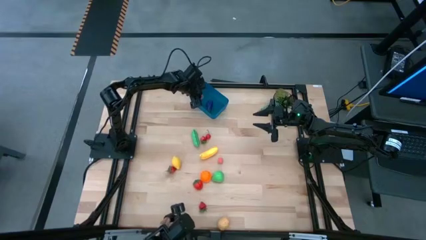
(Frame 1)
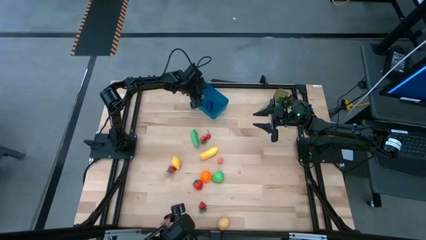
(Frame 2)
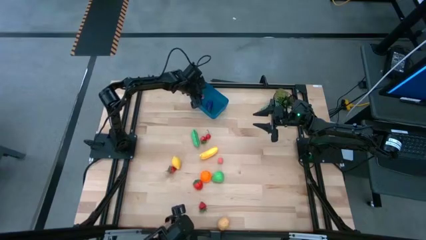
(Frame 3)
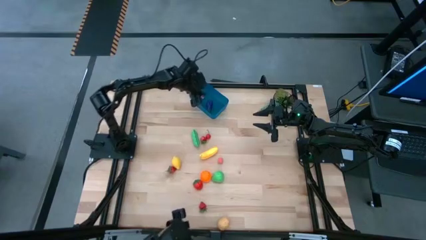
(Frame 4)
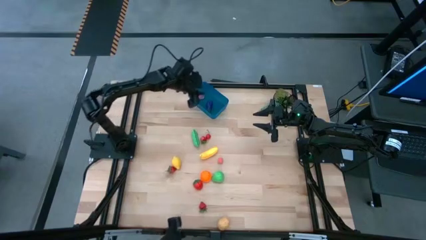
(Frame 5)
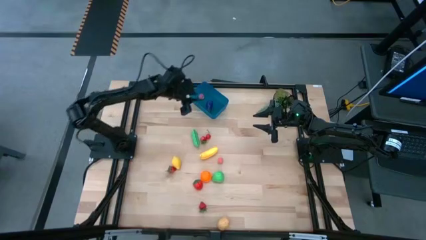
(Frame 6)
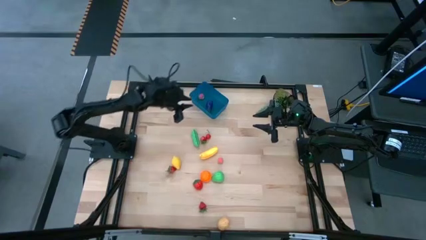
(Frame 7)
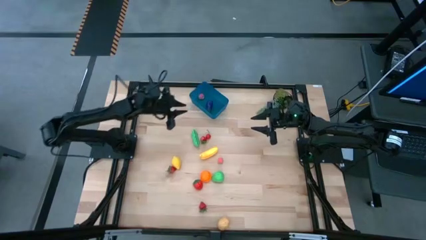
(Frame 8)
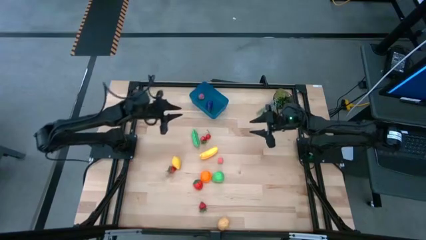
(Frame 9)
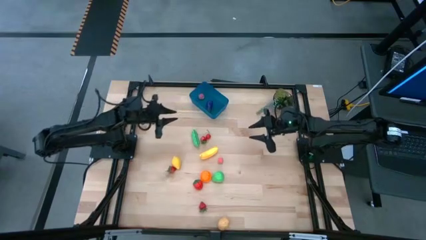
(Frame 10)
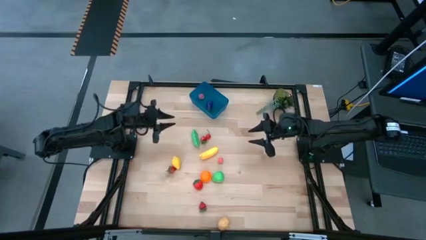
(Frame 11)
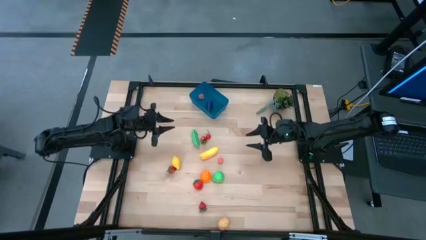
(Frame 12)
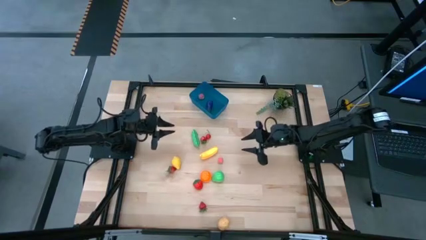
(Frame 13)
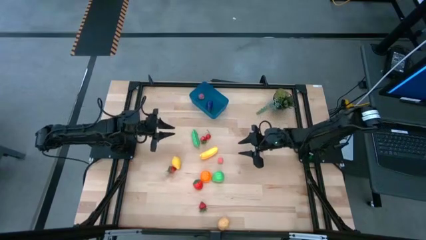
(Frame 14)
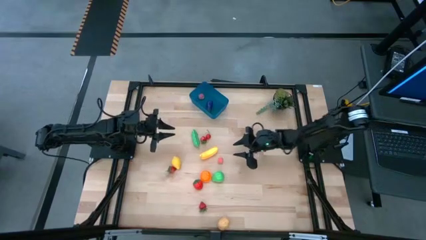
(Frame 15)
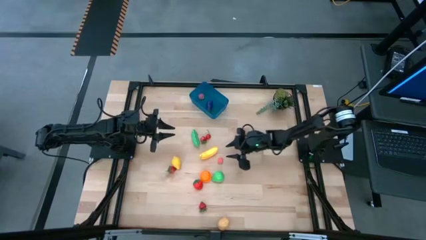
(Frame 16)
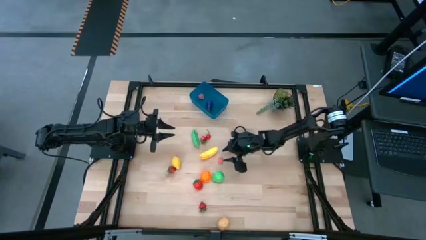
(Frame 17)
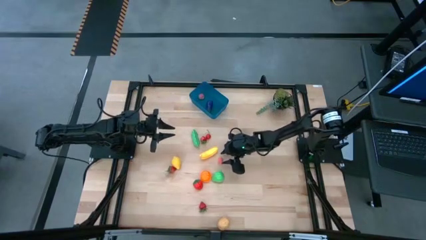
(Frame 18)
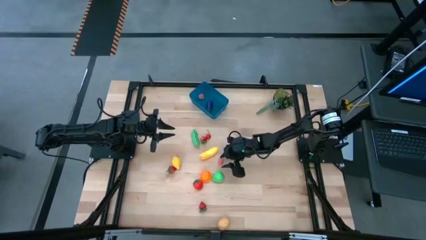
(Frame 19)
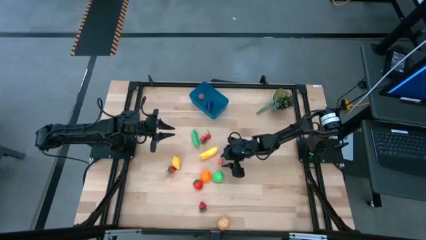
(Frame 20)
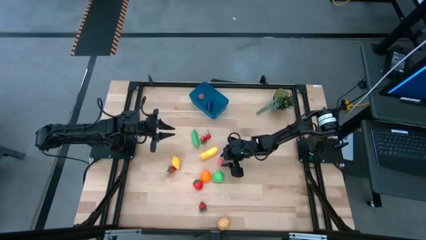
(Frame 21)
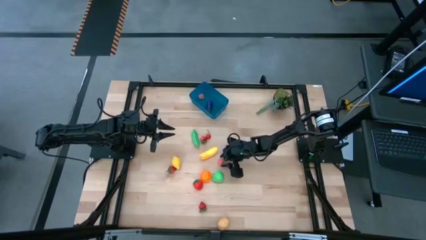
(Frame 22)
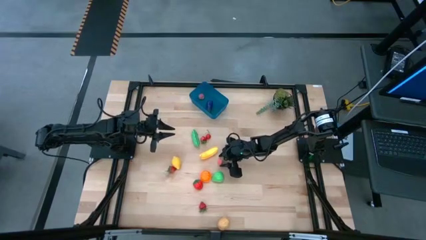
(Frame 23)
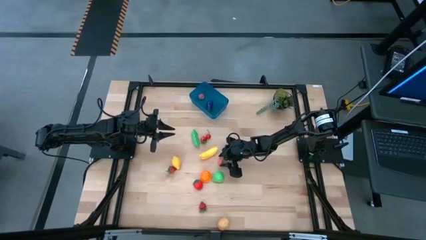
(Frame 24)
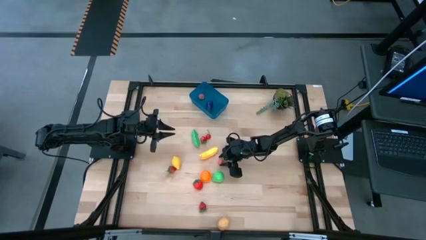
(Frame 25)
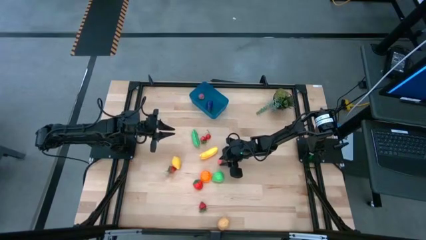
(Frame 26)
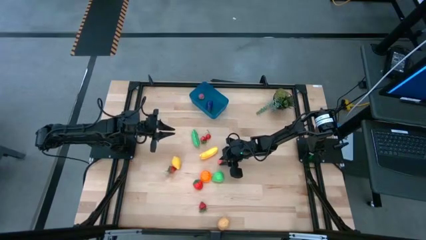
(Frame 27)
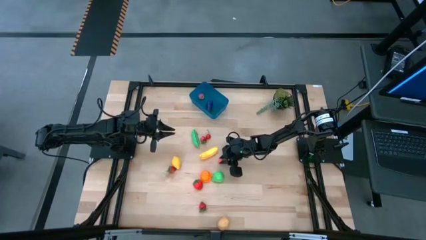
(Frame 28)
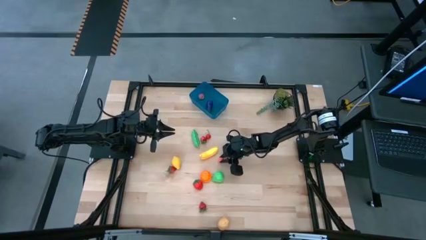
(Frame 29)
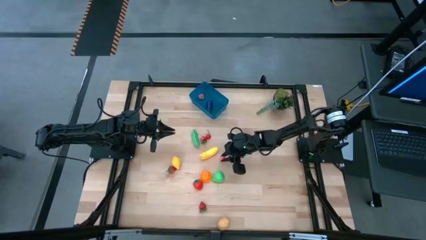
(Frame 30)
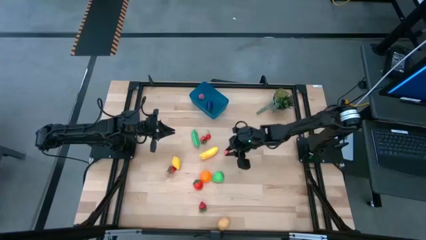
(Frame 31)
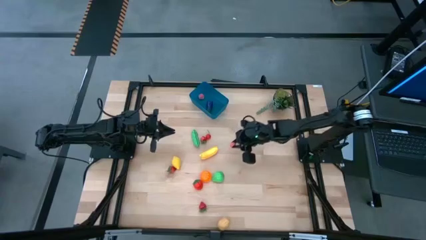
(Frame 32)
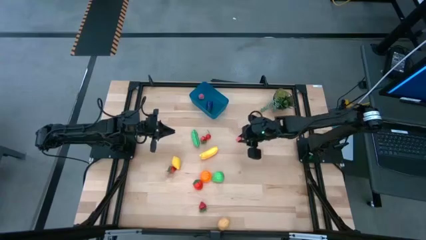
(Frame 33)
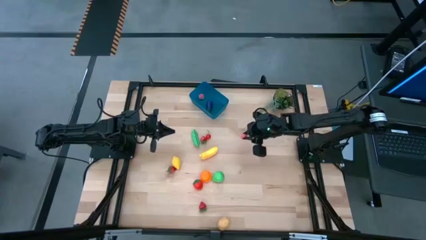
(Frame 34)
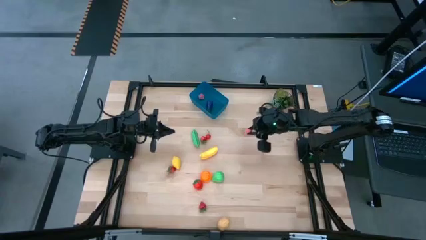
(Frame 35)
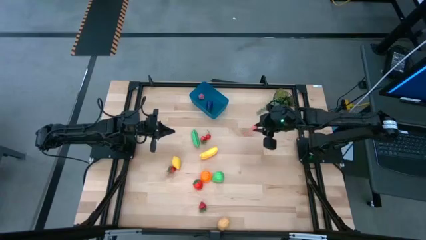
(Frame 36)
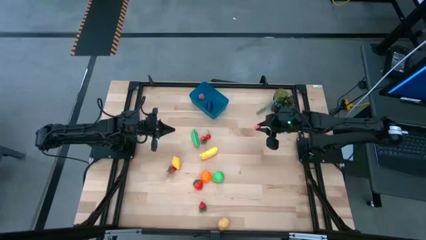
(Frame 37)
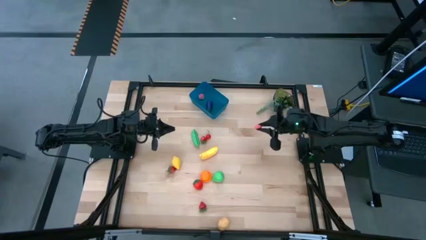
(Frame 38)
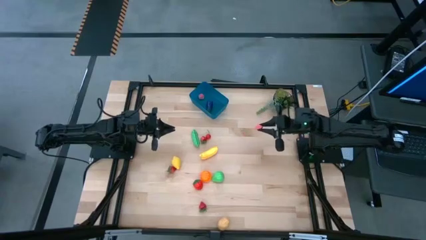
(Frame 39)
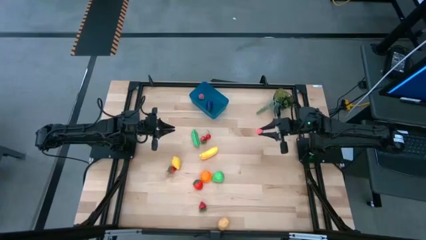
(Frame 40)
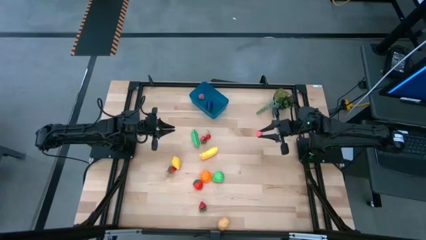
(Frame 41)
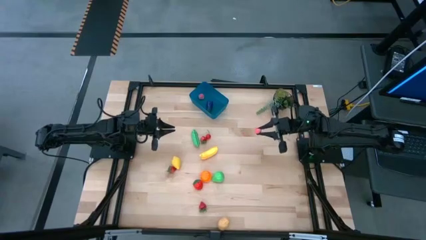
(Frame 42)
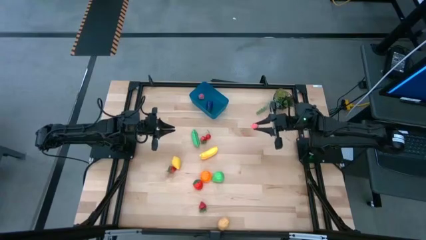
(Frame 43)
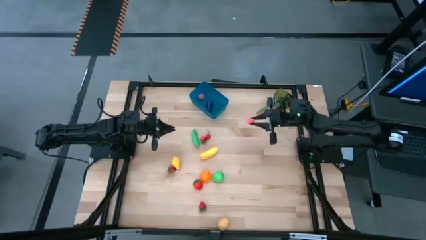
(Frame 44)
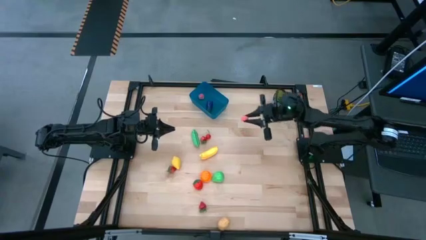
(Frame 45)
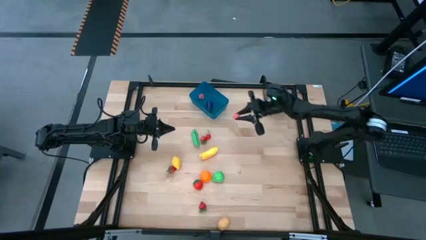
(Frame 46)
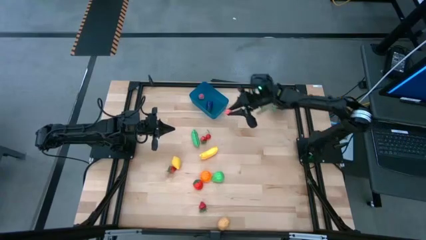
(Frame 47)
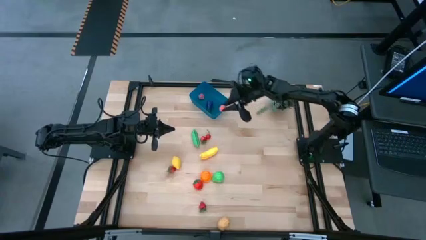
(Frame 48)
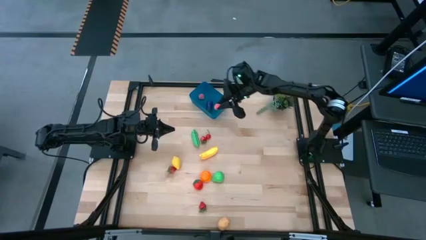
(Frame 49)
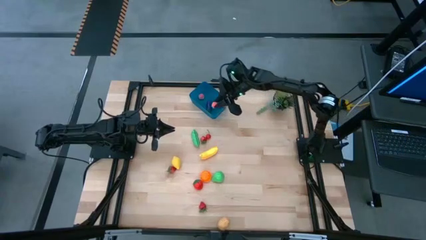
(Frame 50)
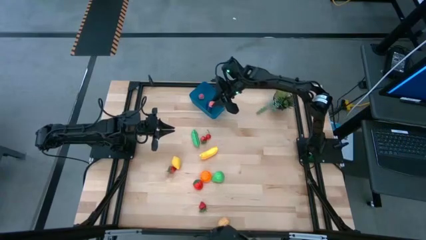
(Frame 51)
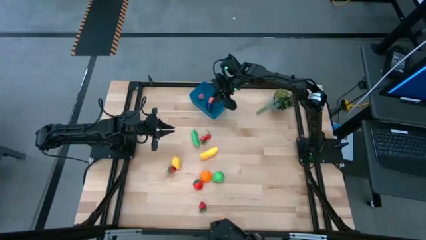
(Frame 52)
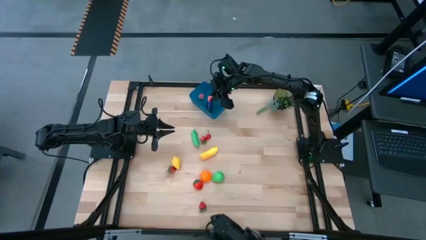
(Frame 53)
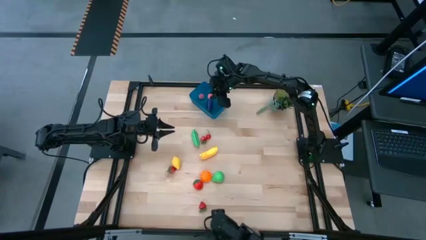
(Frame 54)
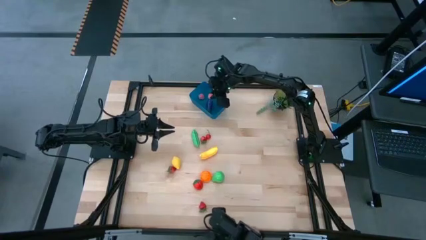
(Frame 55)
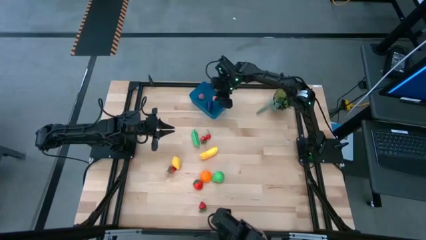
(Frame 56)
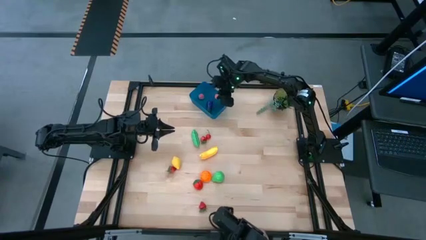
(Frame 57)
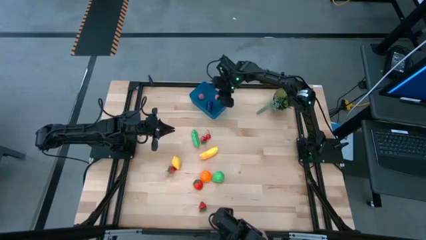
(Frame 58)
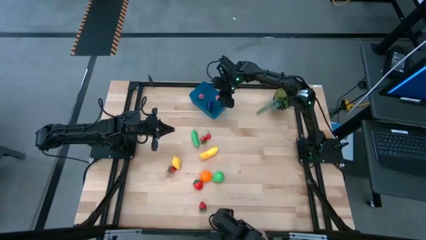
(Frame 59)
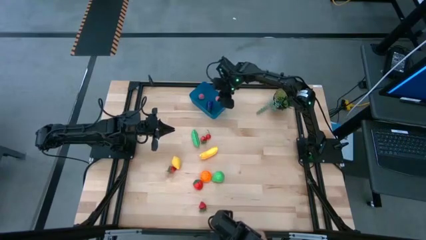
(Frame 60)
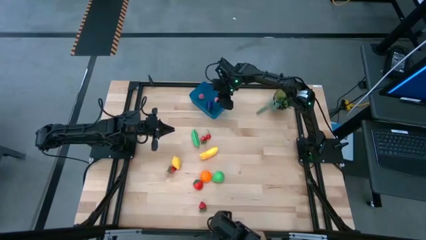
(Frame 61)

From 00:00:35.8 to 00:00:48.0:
Task: Pick and placing Produce into tupperware
Put the peach into the blue bin

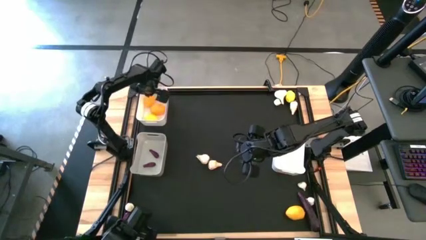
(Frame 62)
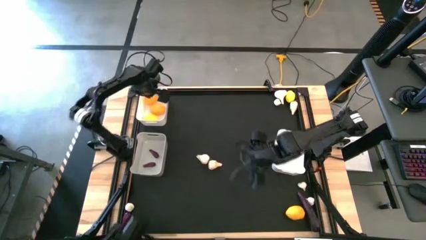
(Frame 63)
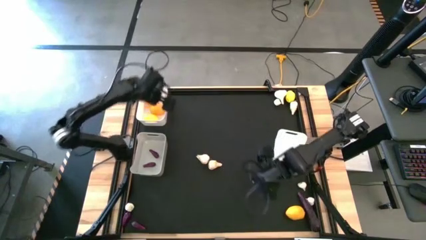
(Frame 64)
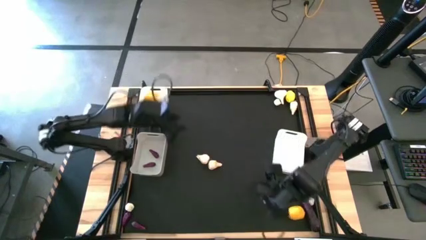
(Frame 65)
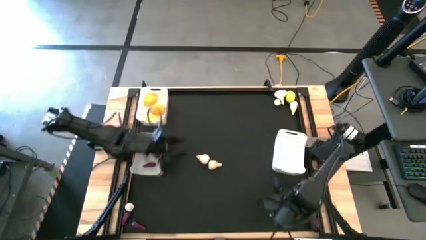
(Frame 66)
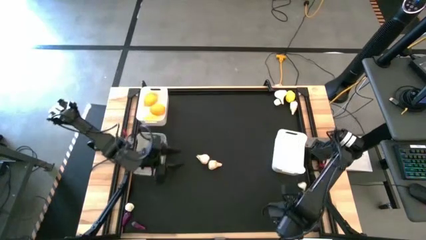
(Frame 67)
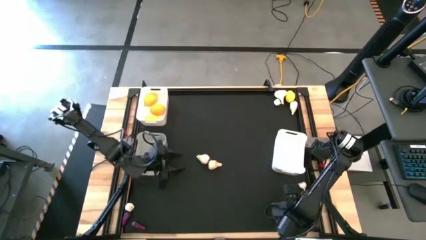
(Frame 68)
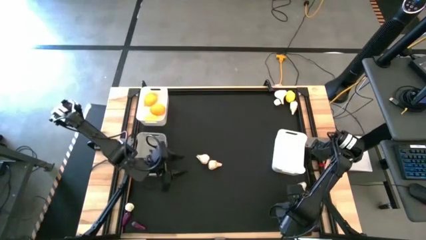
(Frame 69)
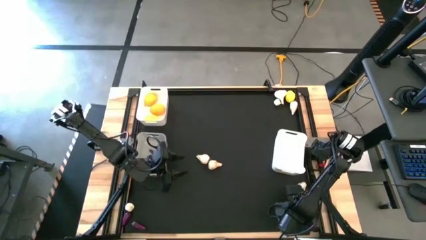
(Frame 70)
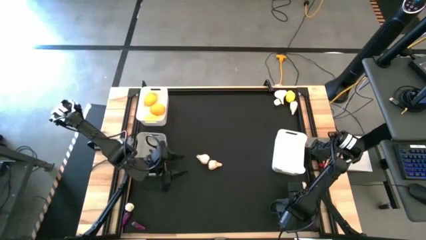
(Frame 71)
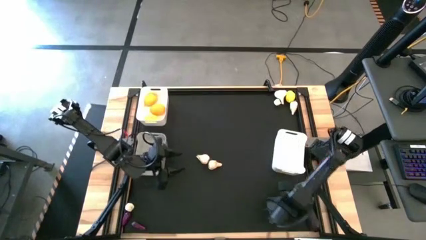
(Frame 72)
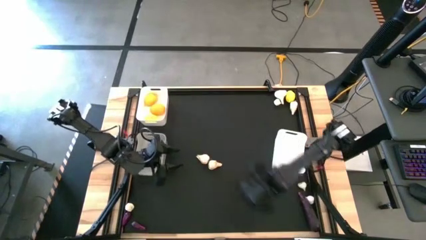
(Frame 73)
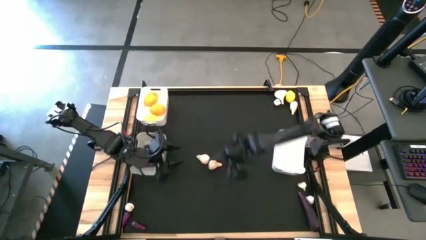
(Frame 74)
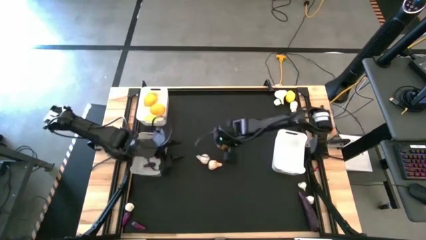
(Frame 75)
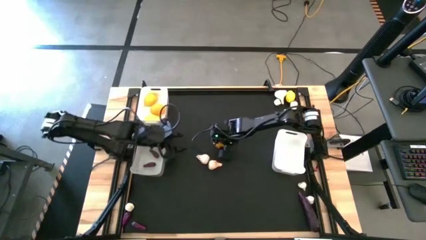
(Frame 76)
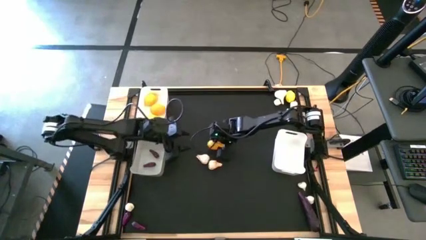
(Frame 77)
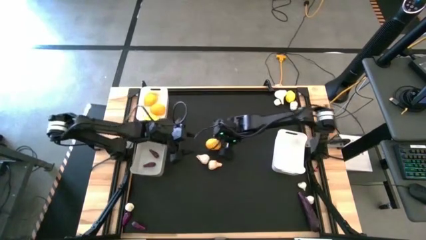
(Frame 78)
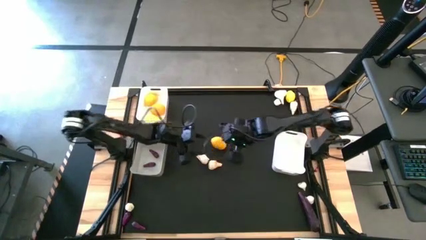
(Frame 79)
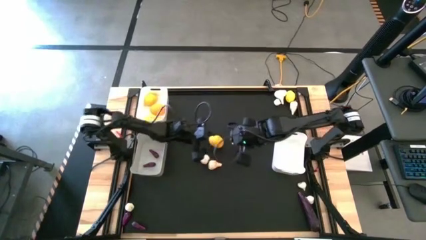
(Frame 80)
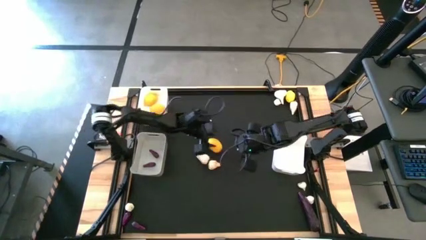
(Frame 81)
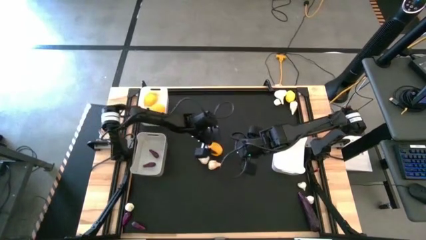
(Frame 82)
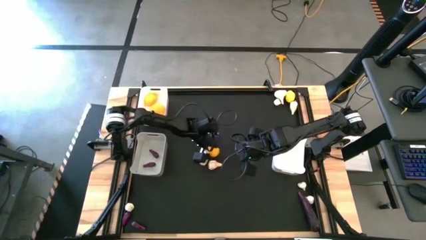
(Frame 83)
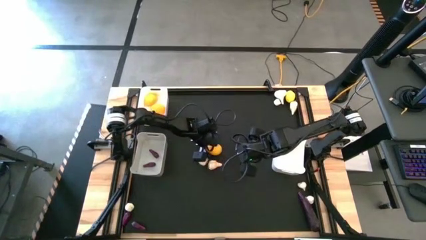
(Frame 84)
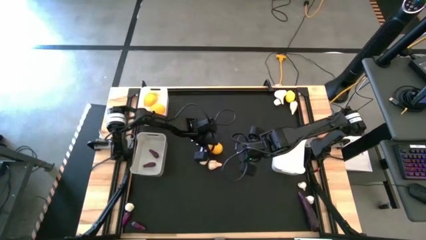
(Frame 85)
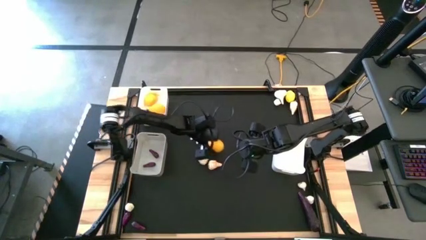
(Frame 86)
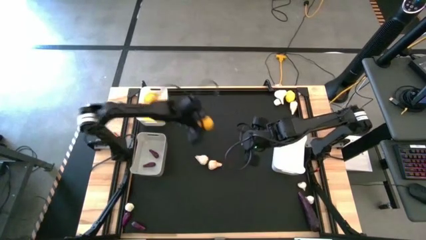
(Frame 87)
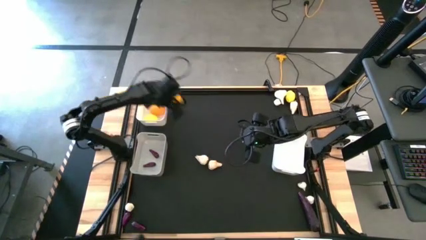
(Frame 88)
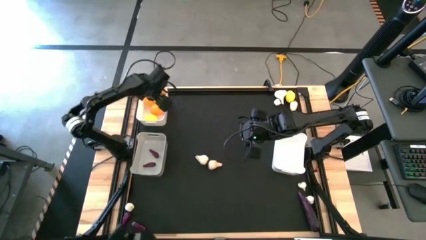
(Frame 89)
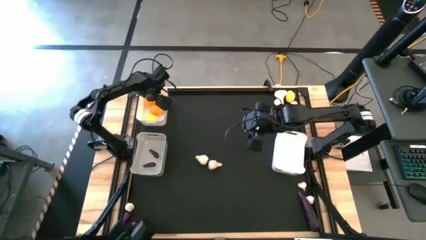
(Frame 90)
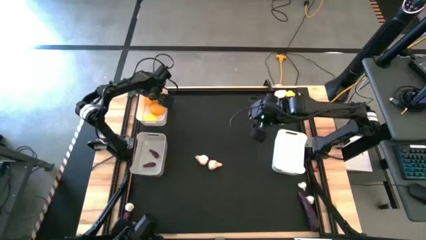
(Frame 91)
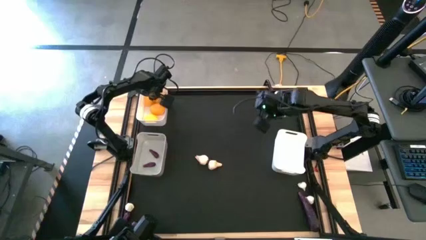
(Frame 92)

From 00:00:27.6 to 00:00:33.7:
Task: Sort produce into baskets
Put the yellow lemon into the top white bin
